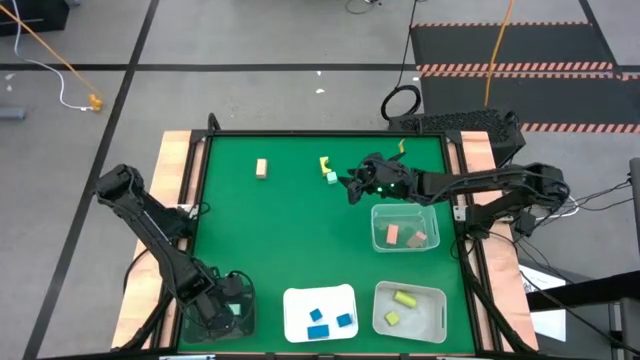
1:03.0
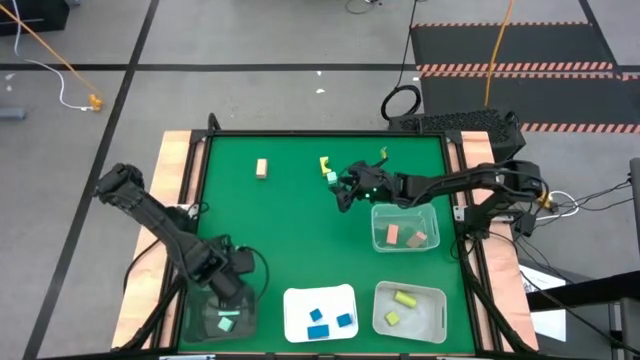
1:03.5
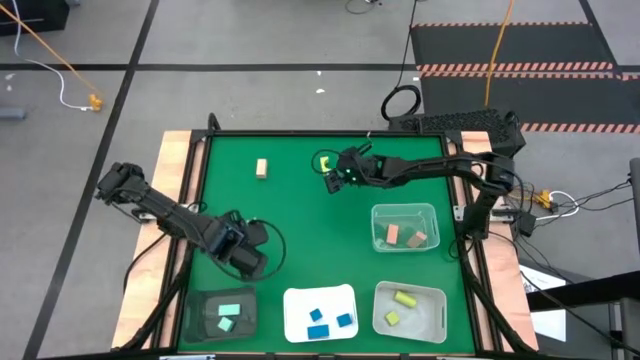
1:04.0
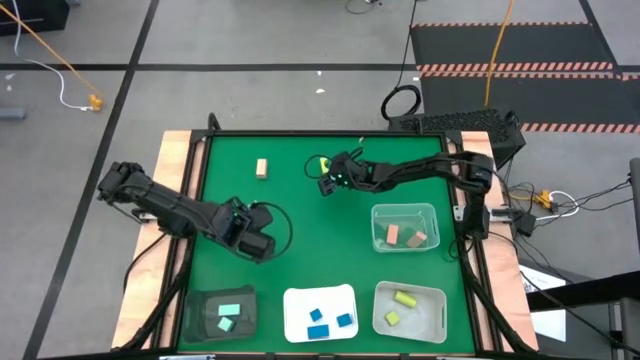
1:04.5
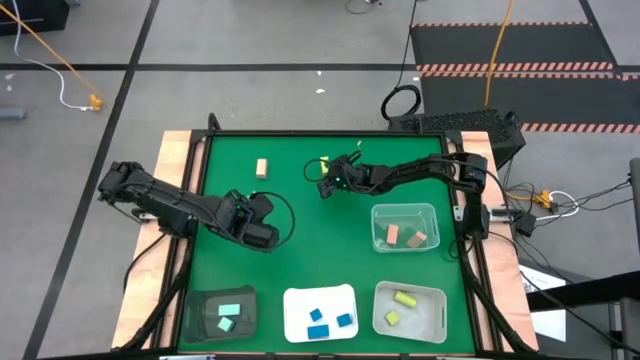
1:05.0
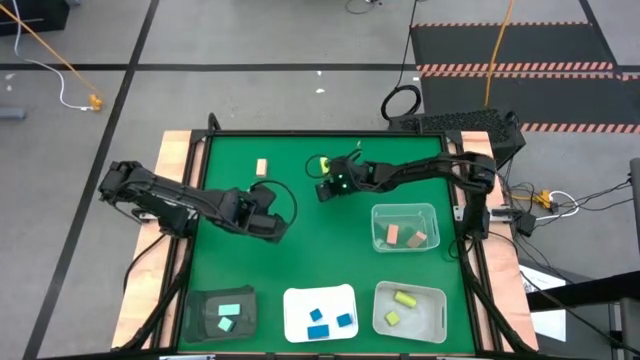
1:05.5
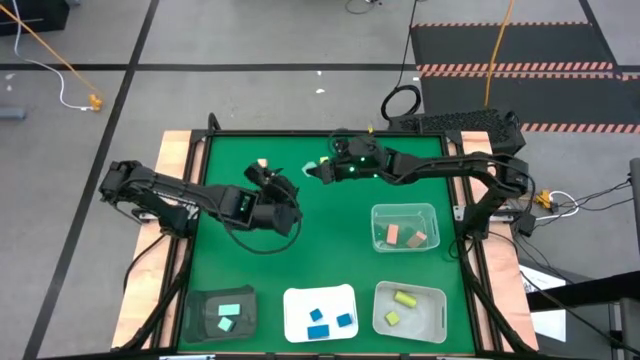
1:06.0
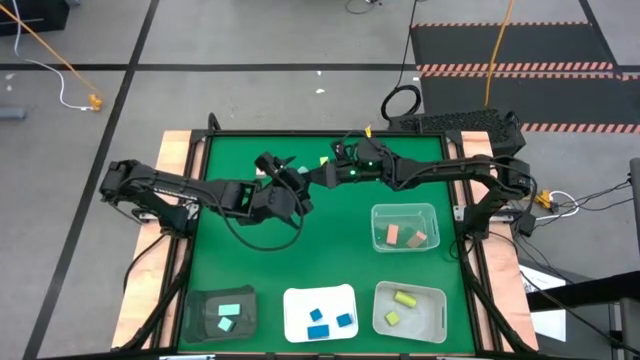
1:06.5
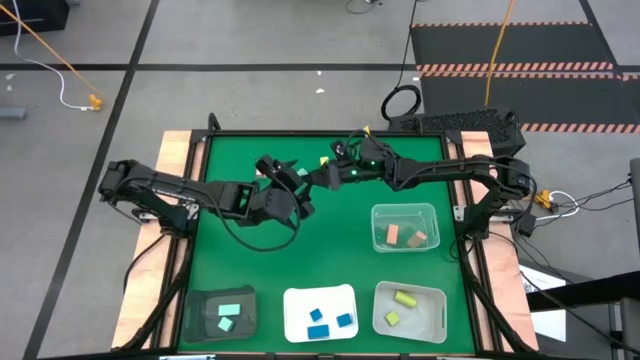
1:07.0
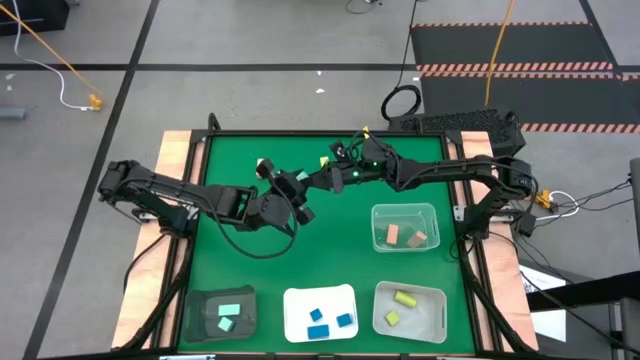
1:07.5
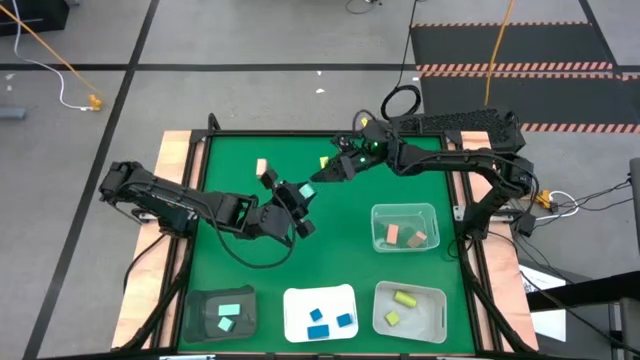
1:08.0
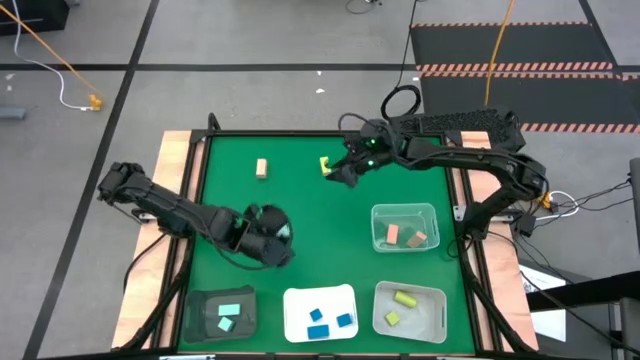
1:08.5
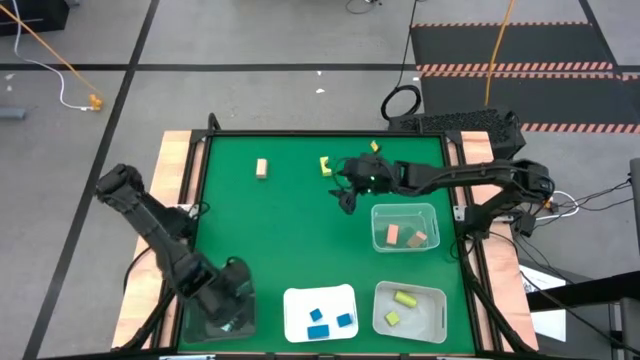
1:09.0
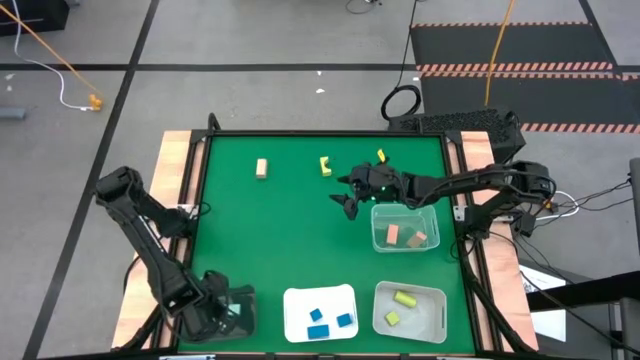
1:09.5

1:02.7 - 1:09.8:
Task: Sort & place blocks by color
Put the light blue block into the black bin

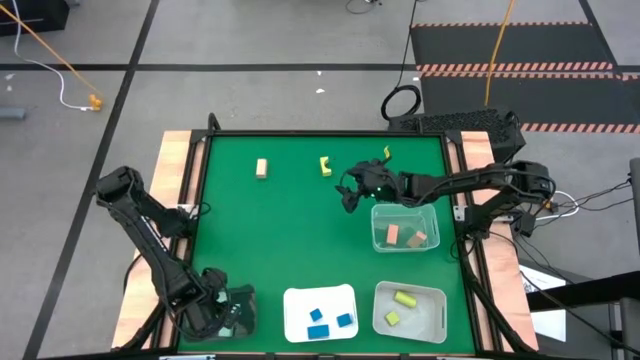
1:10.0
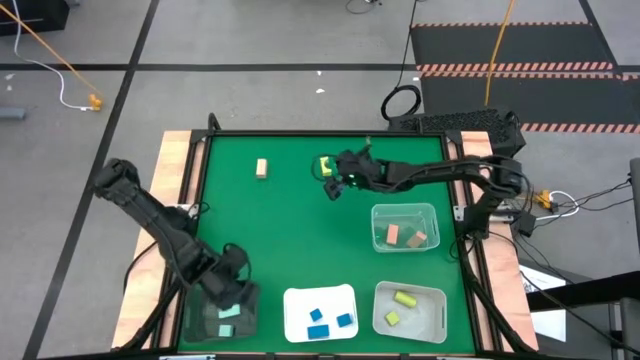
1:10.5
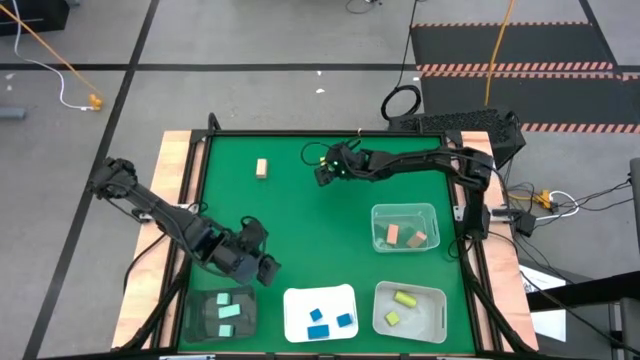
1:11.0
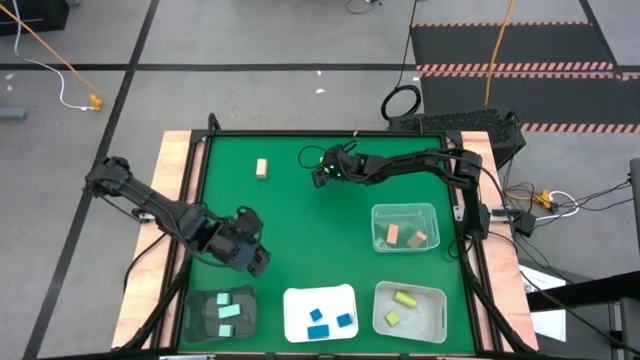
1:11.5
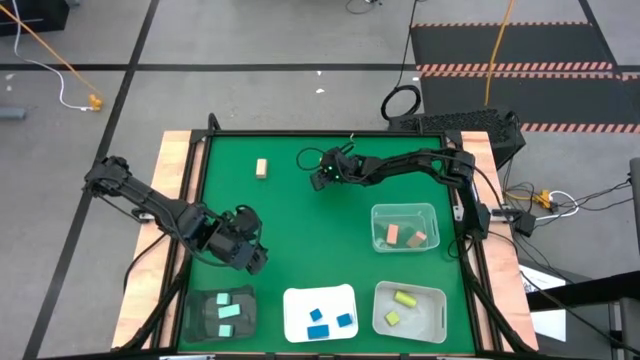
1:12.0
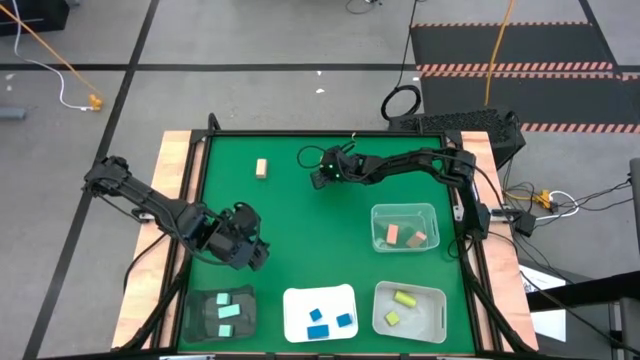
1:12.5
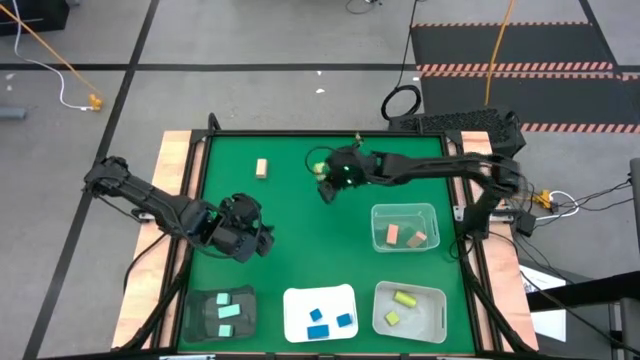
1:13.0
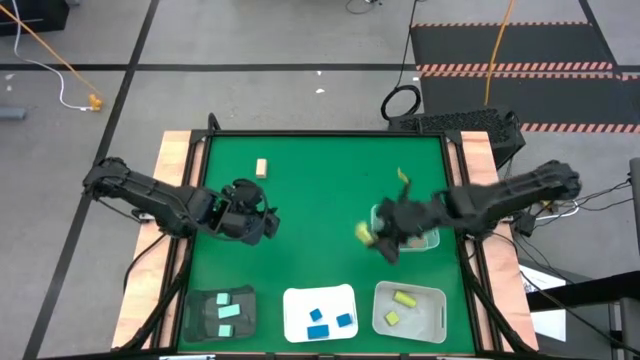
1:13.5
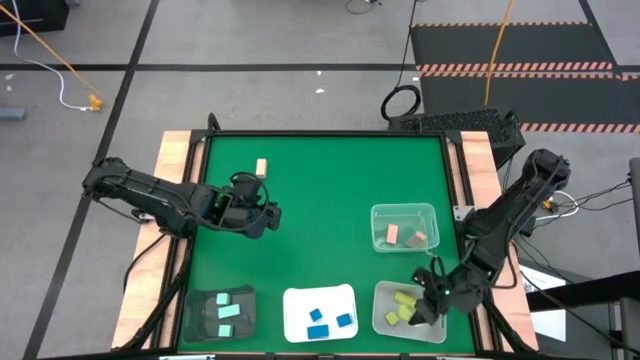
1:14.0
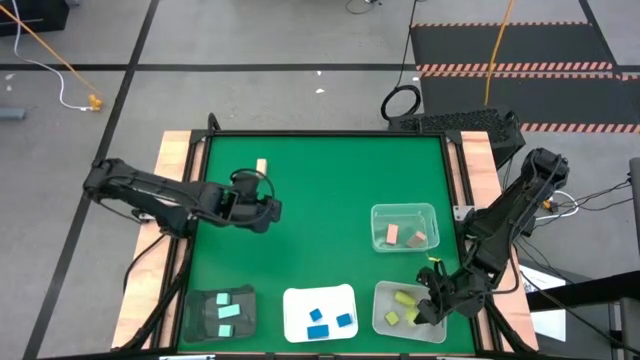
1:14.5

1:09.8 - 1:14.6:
Put the green block into the gray bin

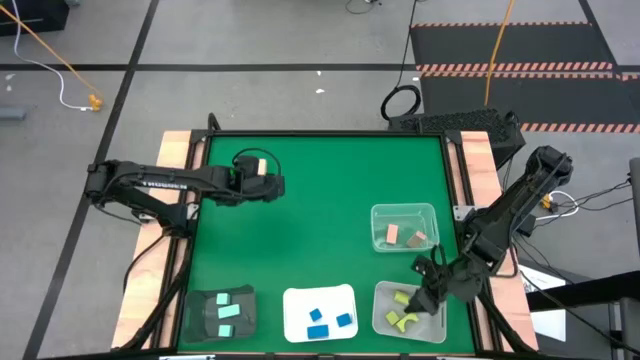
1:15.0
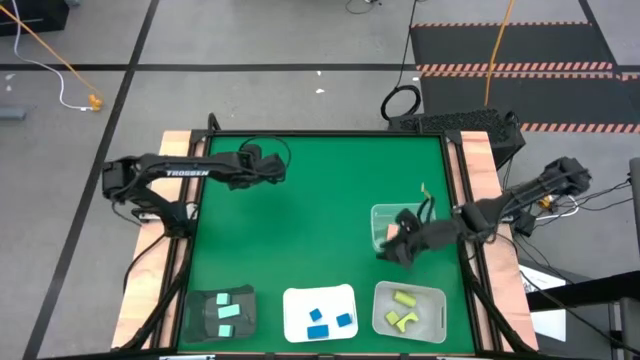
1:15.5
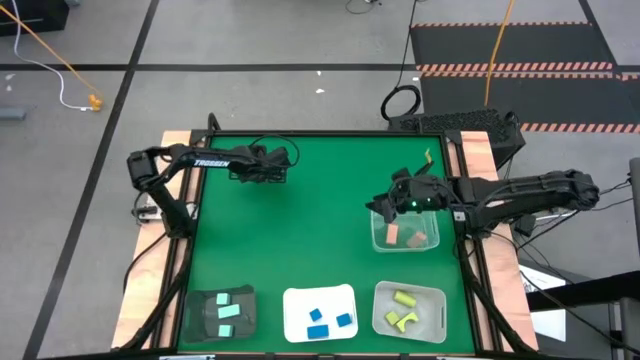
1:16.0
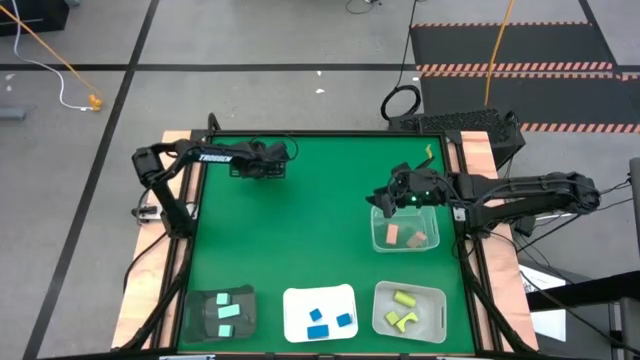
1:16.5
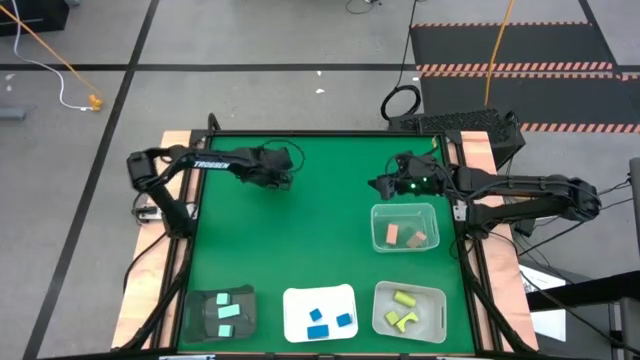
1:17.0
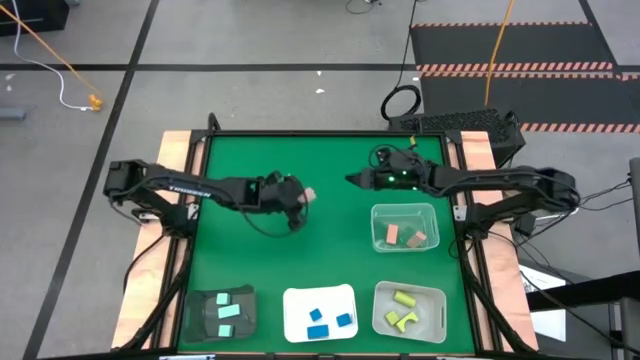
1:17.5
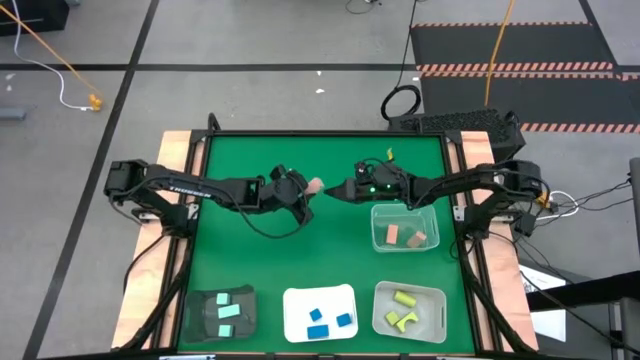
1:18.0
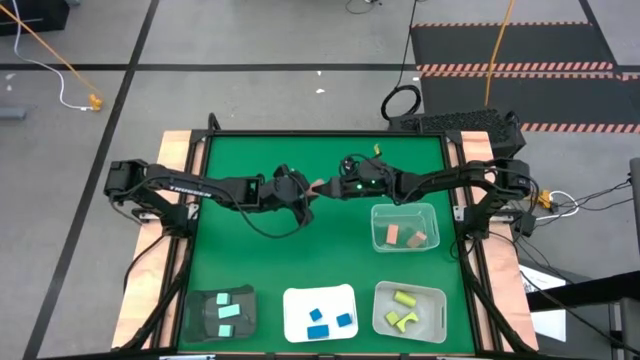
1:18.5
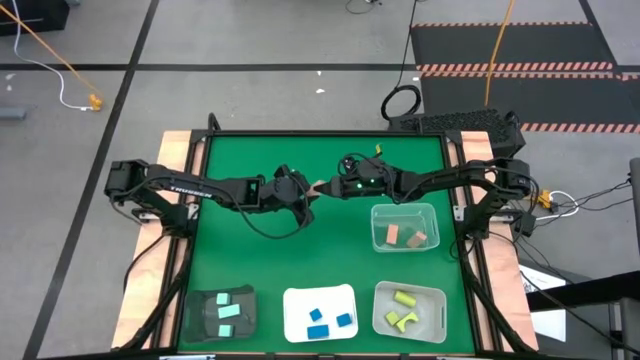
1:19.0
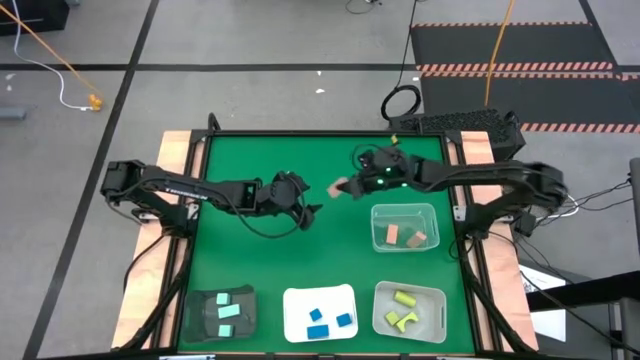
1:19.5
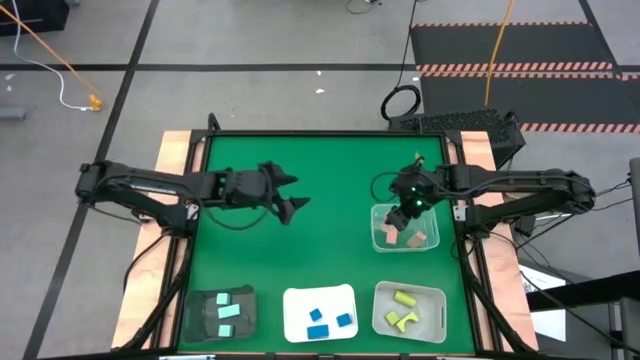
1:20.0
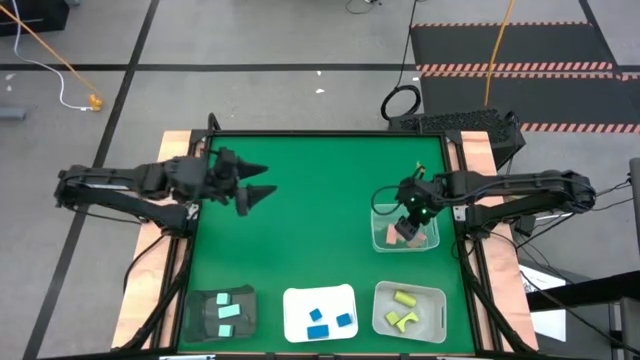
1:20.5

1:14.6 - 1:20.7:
Put the brown block into the transparent bin

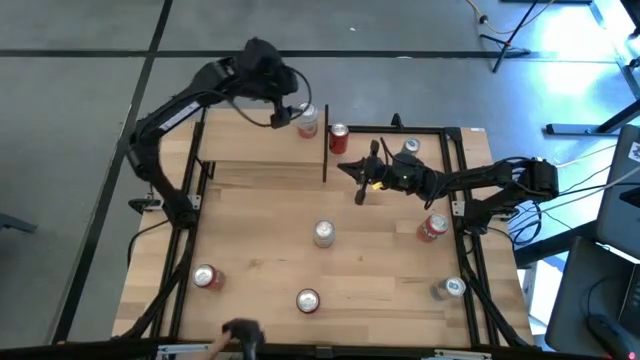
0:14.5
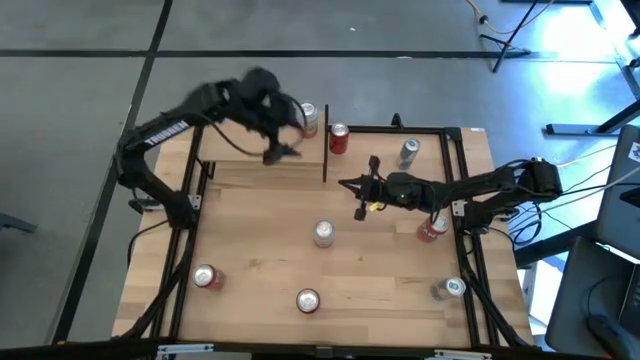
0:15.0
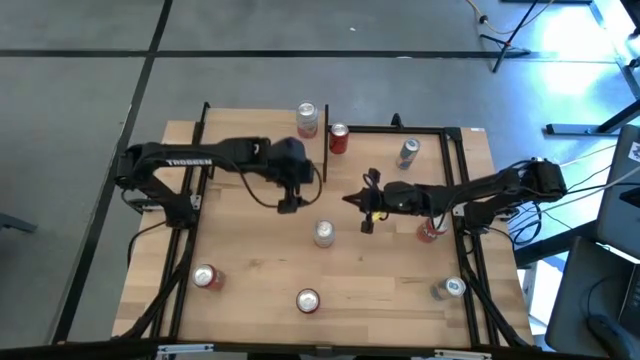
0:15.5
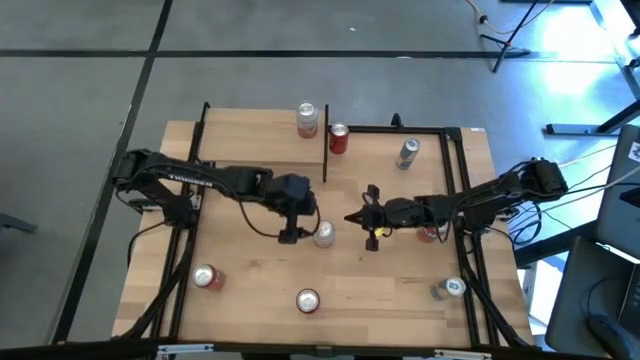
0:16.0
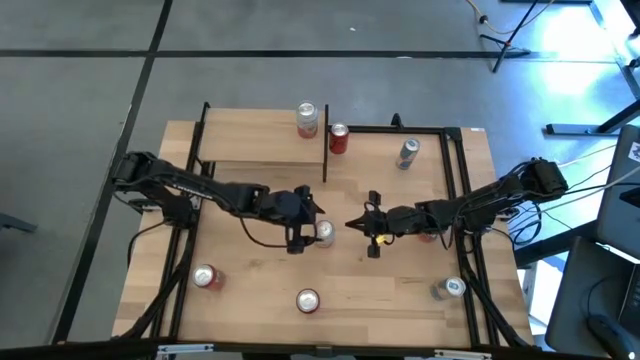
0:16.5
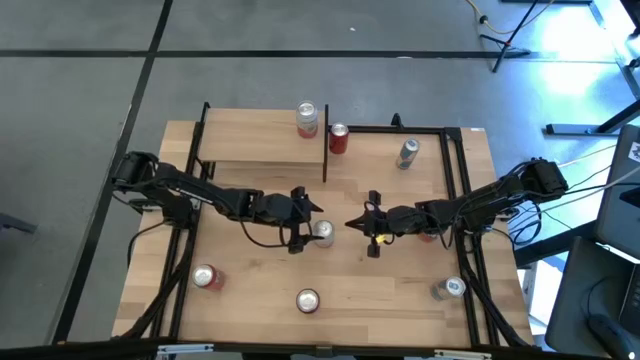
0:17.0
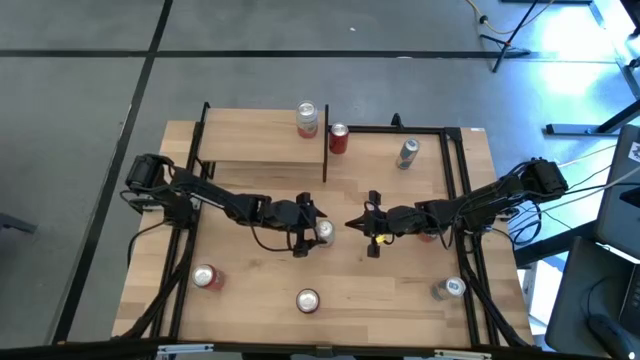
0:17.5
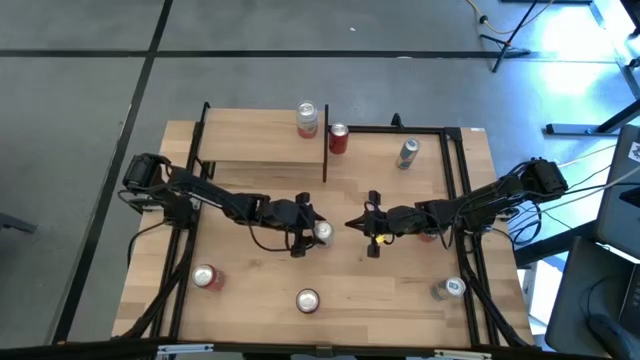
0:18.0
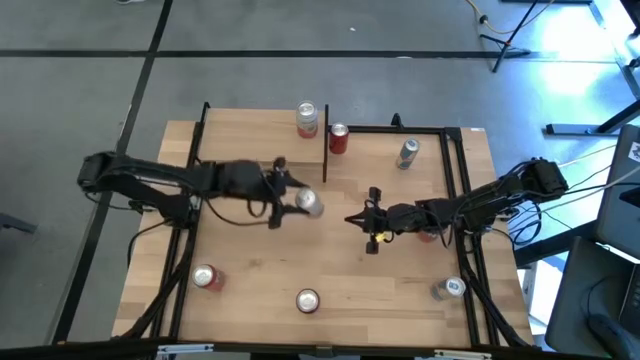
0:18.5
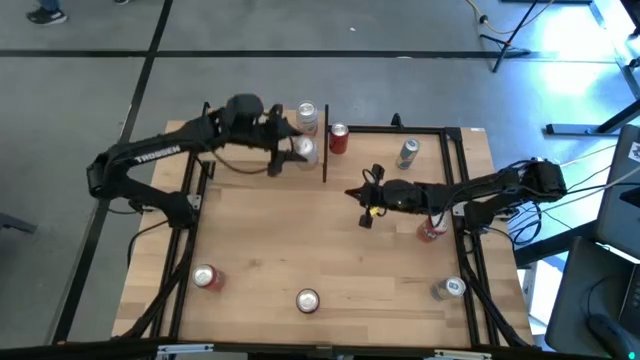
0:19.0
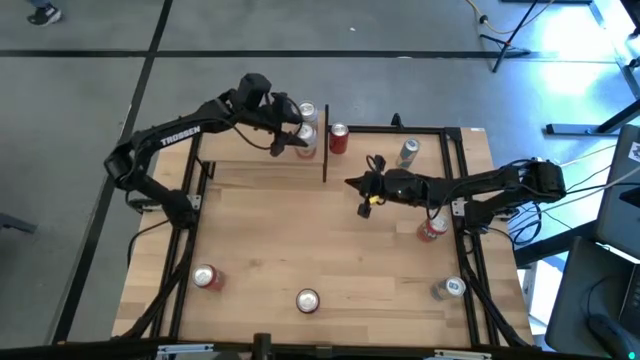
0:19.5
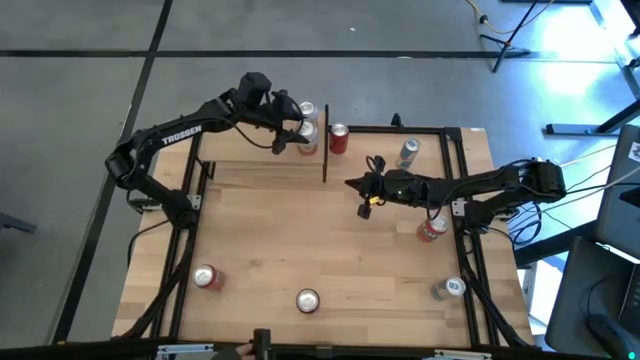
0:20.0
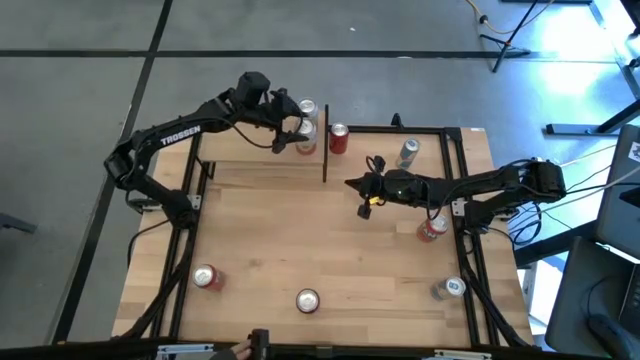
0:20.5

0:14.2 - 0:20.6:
Task: Place canned beverage on shelf
Put the pink soda can aligned with the other pink soda can on the shelf
